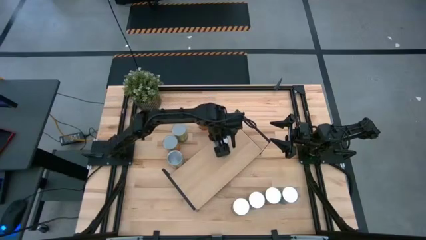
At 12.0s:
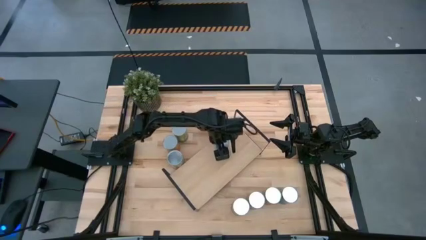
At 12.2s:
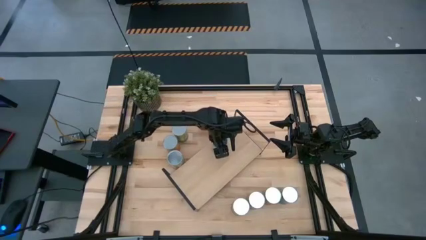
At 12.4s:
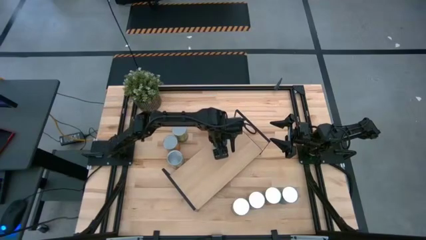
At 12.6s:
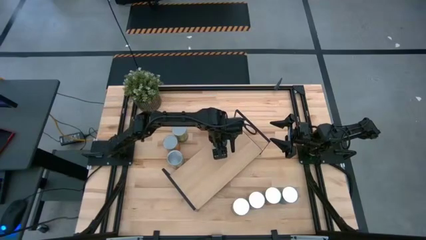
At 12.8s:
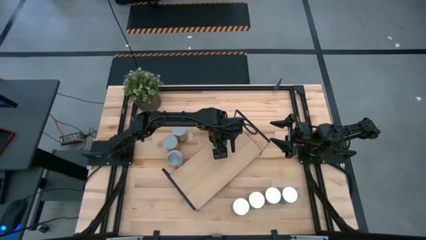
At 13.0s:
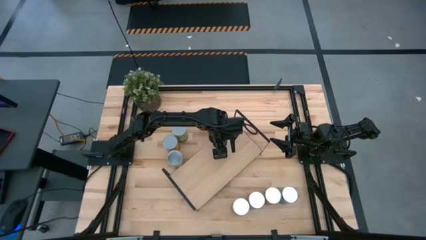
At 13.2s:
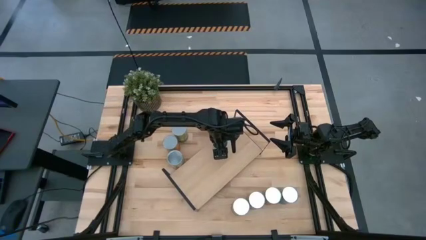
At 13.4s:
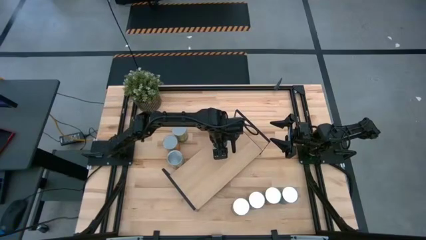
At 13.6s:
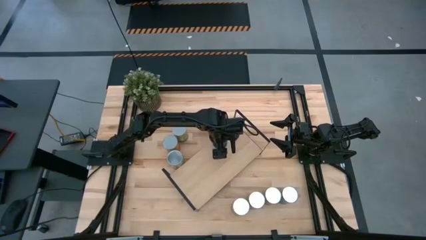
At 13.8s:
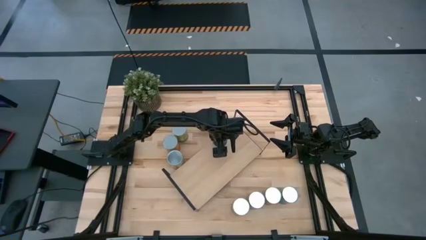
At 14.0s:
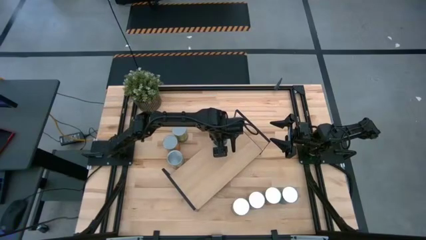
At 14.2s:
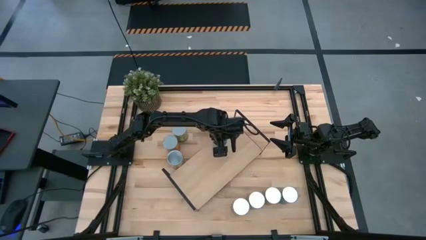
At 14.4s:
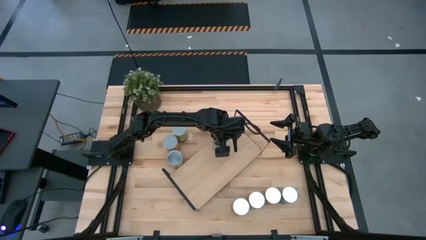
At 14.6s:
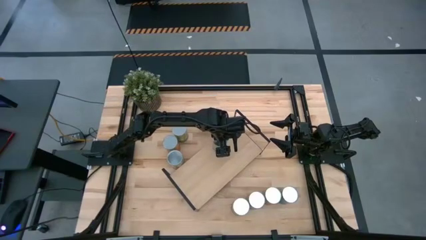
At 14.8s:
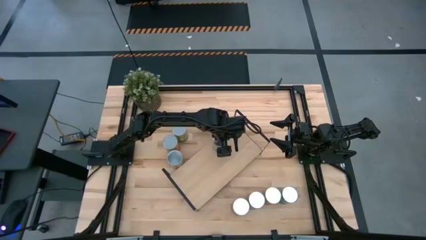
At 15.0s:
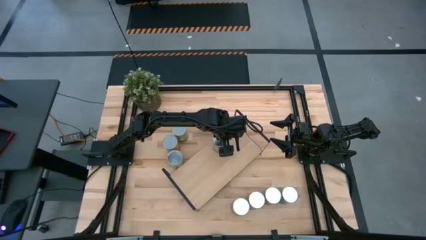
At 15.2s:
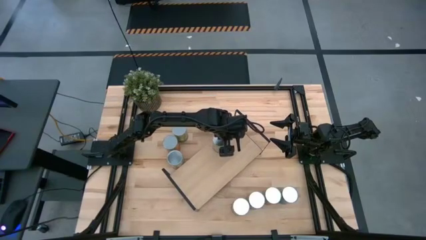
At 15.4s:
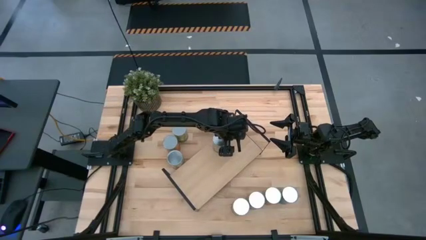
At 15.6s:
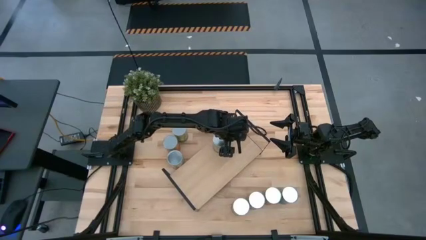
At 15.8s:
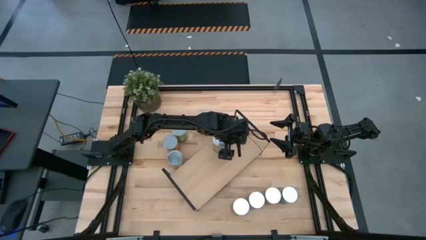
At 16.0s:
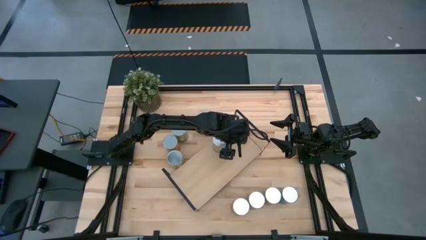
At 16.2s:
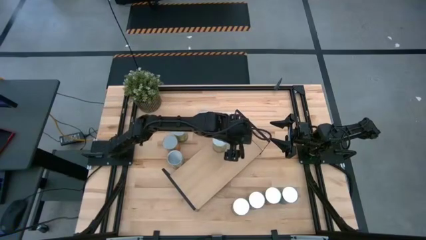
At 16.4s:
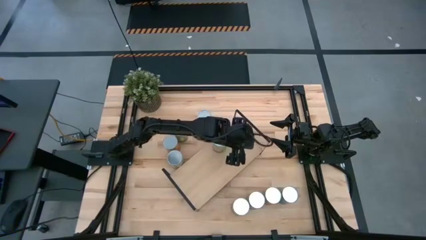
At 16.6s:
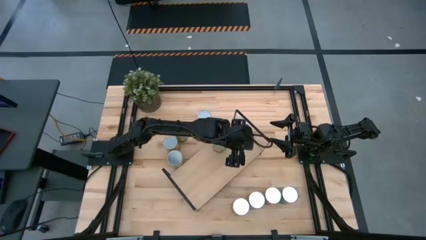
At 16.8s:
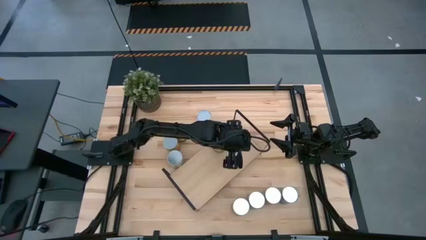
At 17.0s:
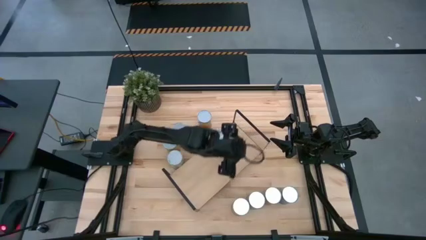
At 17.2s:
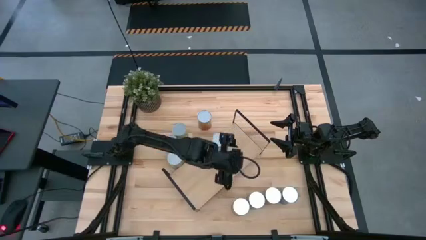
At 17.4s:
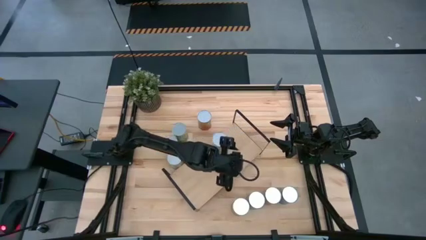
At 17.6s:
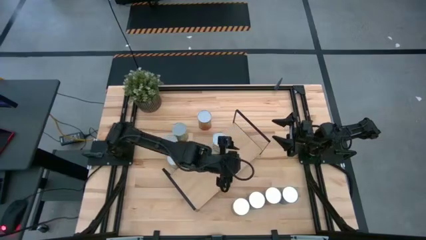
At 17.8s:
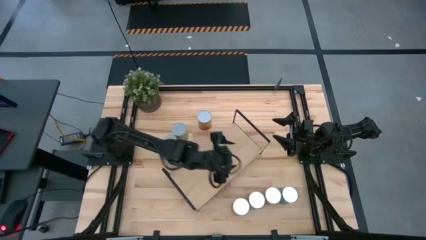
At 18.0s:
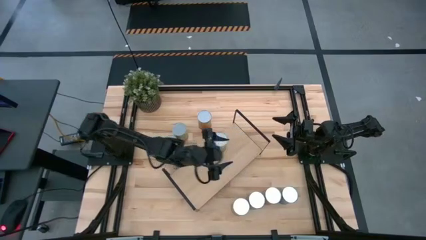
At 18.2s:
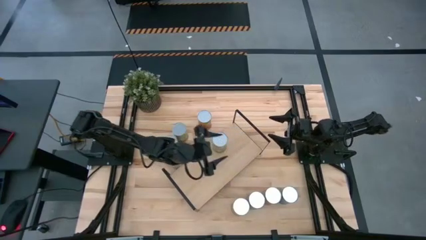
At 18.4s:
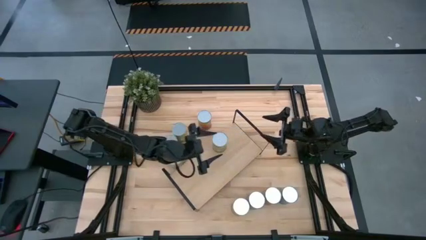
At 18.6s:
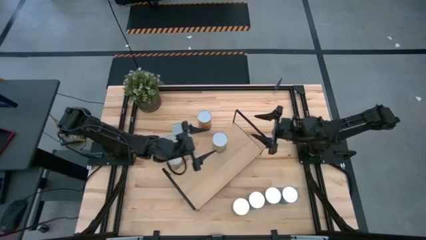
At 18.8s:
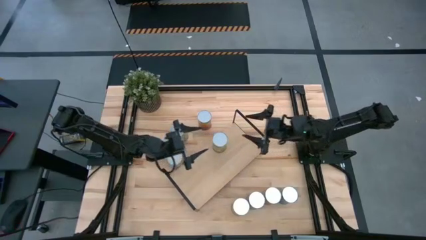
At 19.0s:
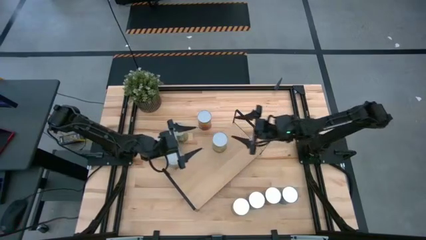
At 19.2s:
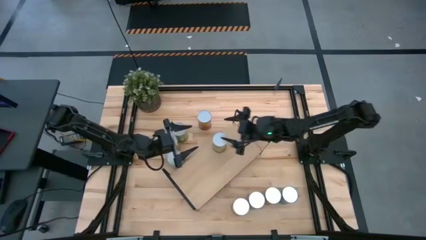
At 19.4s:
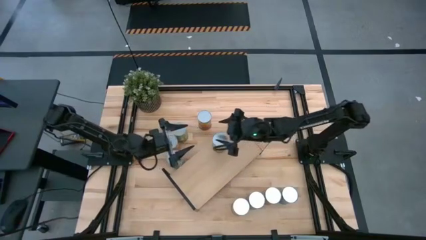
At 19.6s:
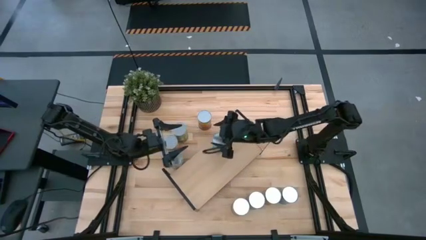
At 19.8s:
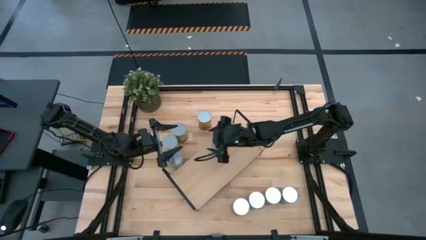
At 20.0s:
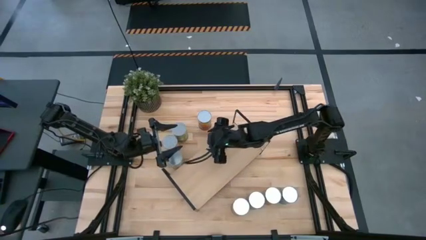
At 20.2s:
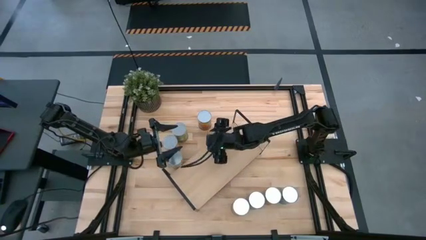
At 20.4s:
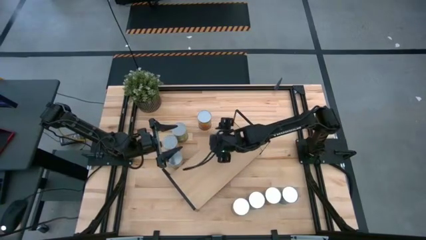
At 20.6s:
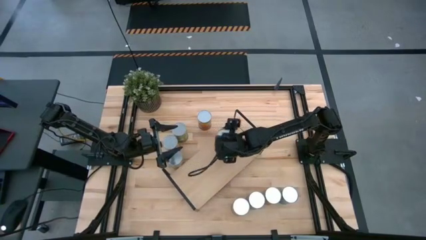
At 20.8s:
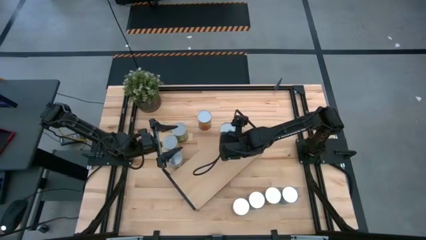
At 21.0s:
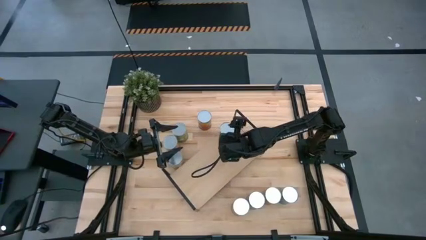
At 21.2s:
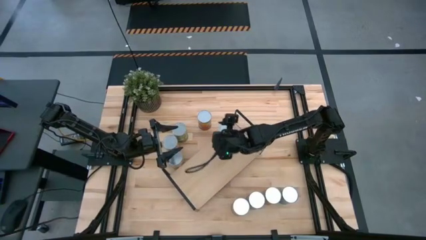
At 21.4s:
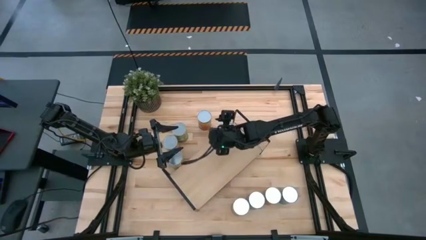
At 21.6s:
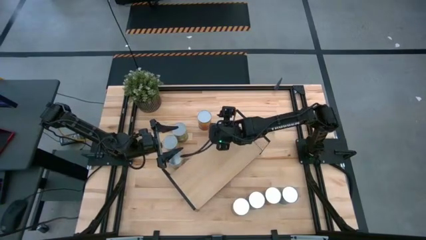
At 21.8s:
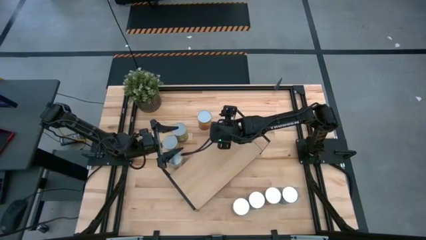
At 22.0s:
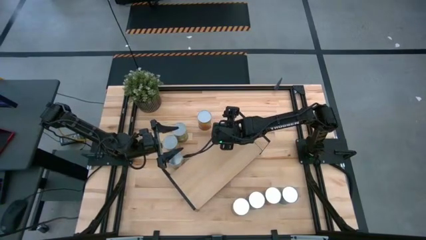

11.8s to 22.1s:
Task: Pick and place cans onto a shelf
Put the canned orange on the shelf

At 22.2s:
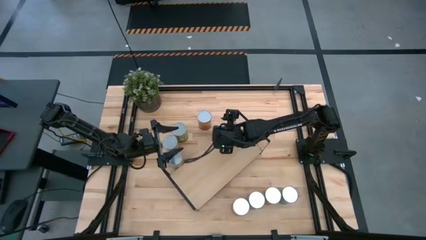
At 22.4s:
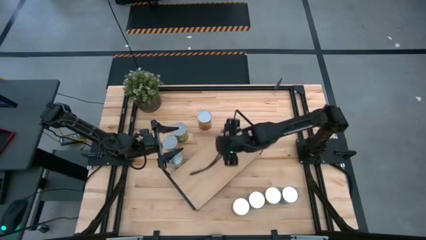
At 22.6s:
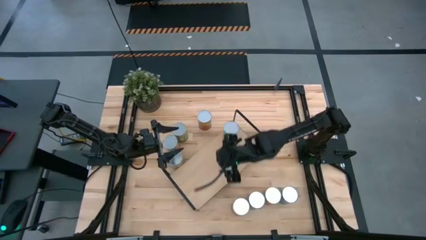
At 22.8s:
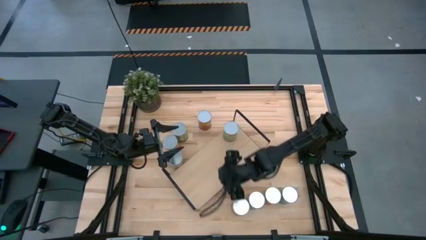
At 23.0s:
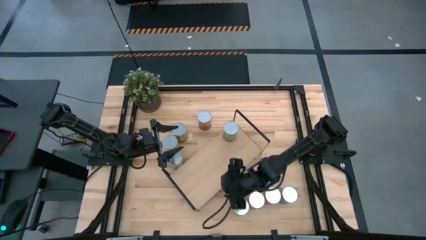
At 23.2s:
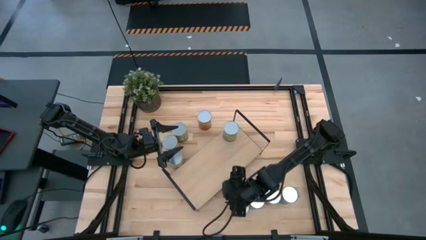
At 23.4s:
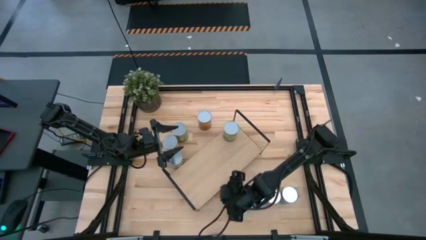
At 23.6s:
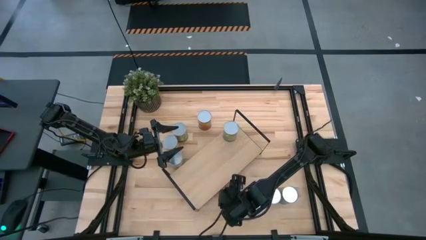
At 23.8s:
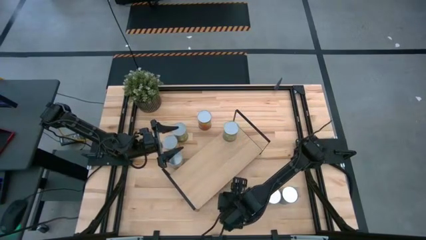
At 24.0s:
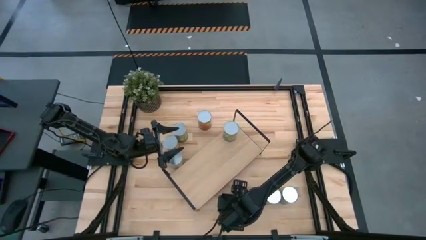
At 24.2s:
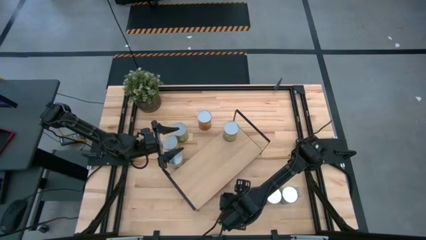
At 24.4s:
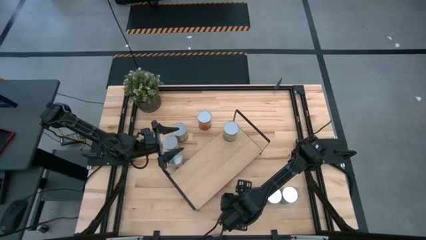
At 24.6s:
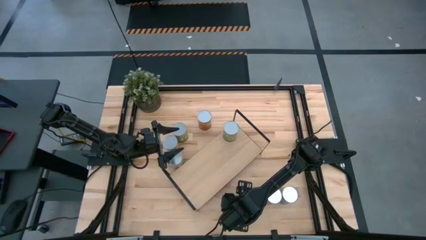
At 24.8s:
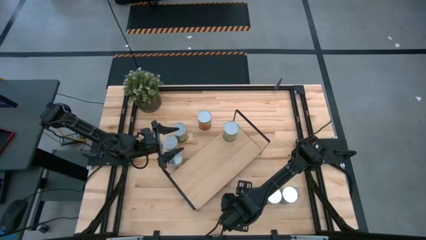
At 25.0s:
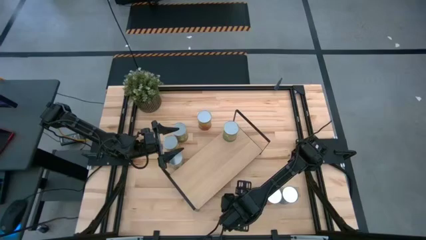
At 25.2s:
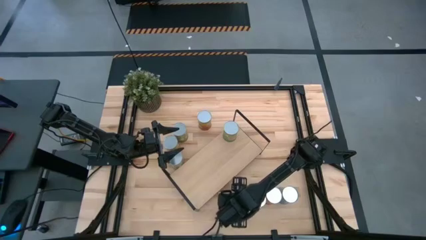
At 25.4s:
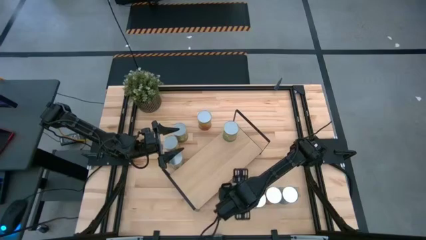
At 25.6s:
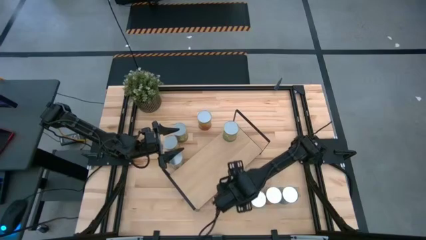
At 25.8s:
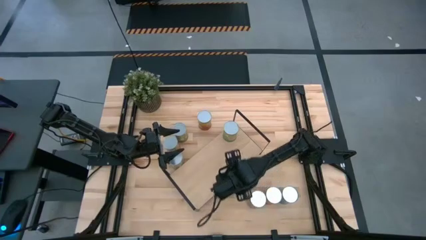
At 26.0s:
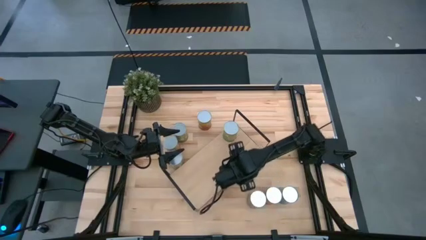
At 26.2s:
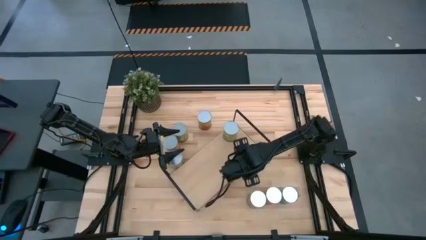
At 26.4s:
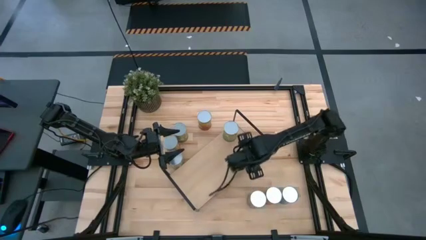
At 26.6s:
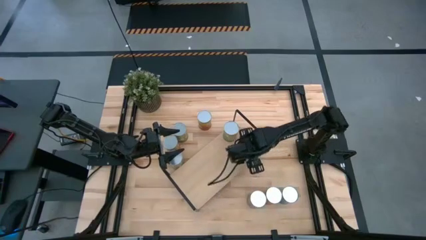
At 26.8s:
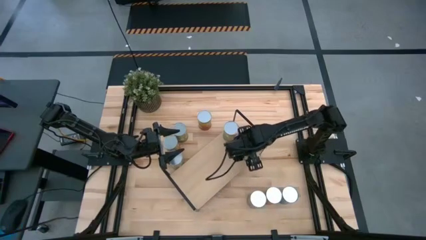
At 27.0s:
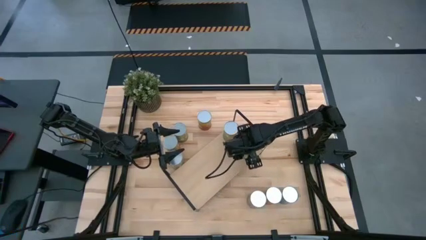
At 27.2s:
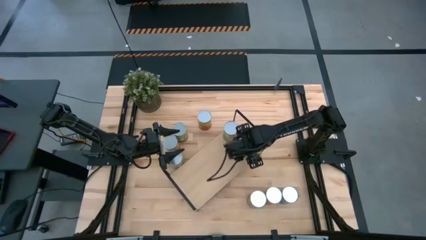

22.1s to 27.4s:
Put the canned orange can on the shelf

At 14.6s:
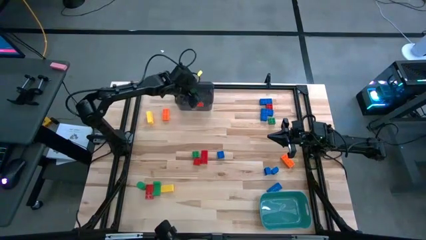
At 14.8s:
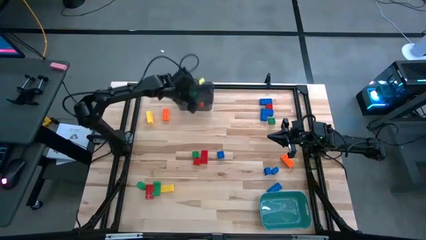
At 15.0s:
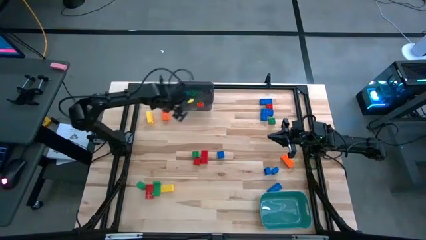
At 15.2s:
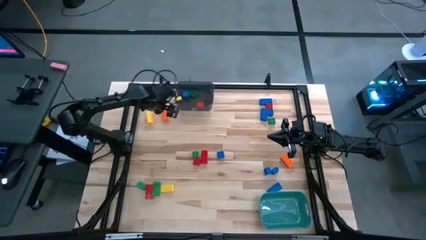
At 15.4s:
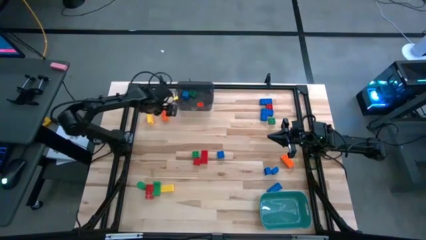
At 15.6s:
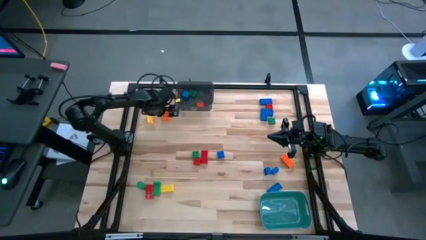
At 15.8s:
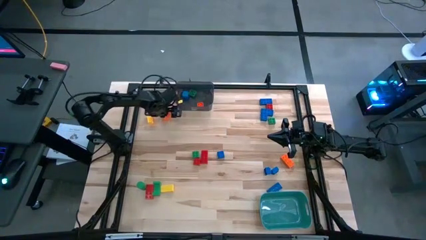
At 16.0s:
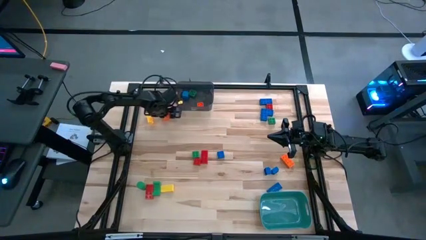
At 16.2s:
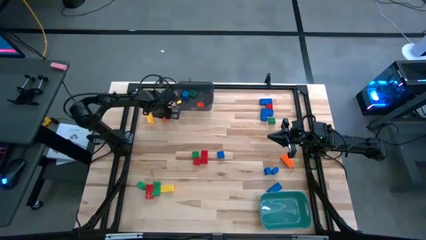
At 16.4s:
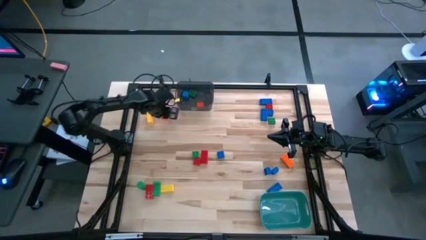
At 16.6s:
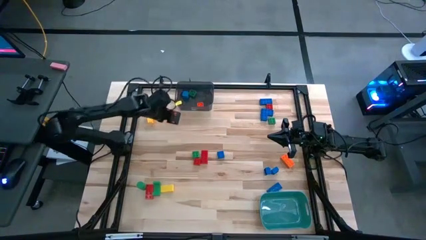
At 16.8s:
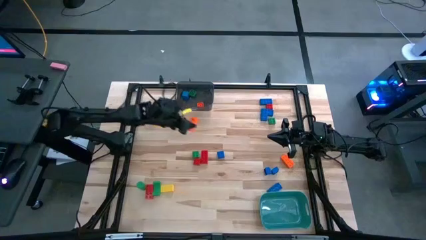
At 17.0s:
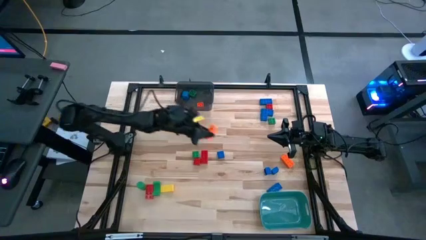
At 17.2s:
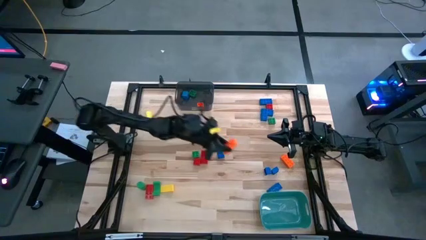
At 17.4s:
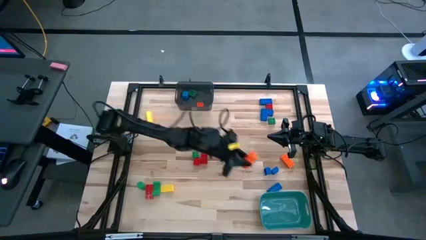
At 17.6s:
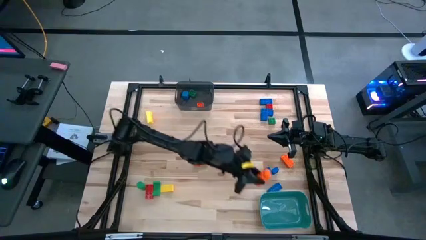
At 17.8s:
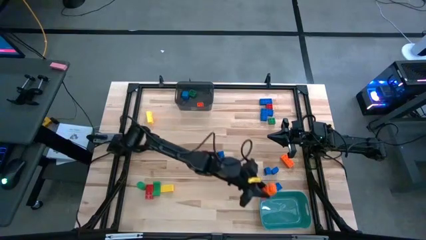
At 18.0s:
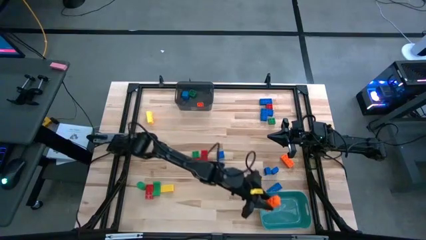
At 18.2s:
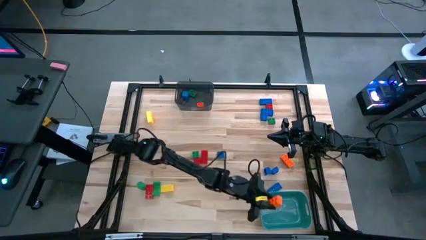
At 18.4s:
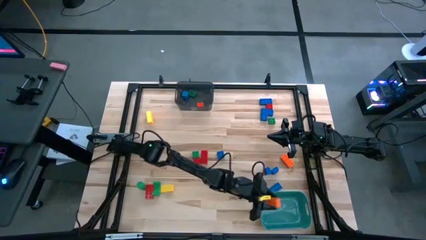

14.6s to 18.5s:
Task: Sort blocks by size
Put the orange game piece into the green bin
